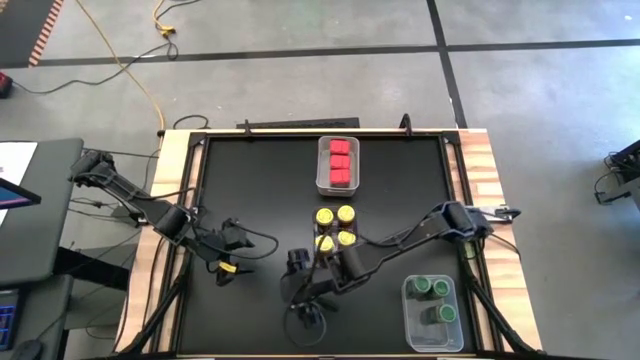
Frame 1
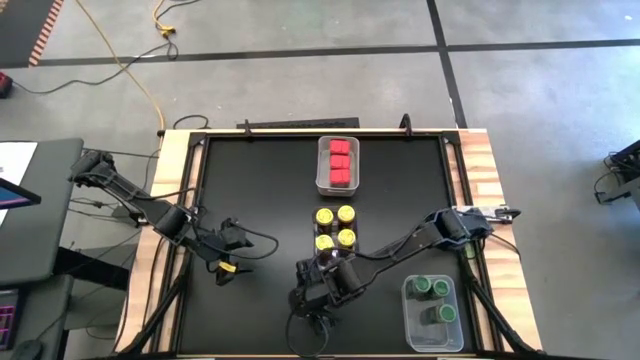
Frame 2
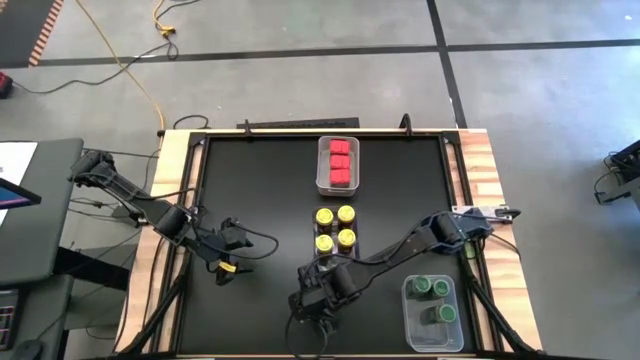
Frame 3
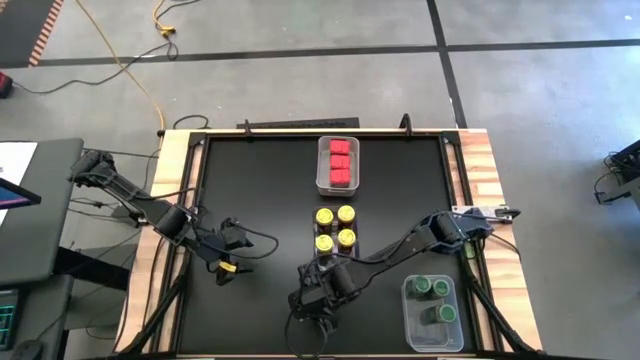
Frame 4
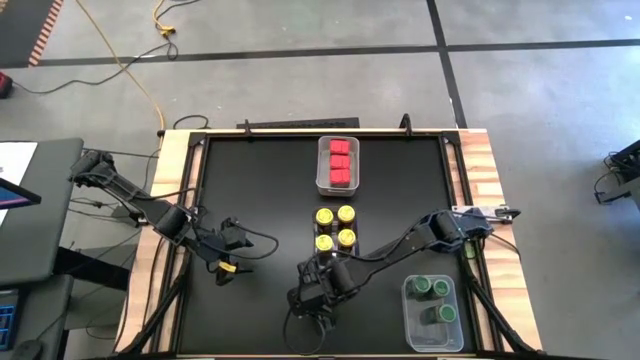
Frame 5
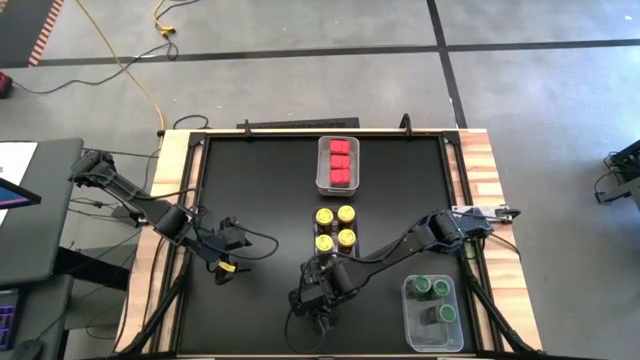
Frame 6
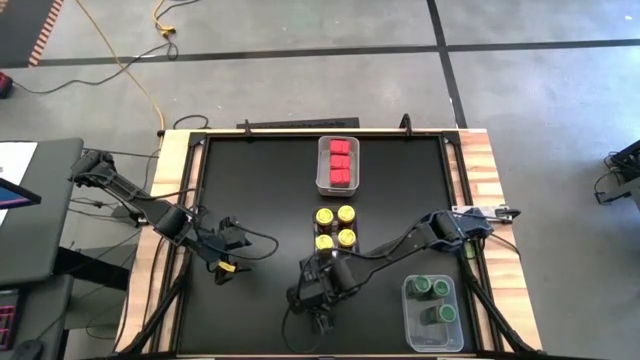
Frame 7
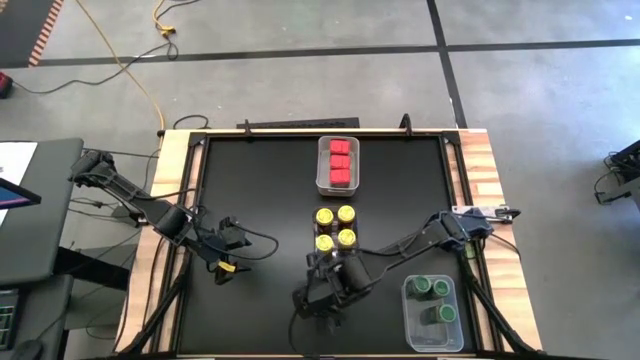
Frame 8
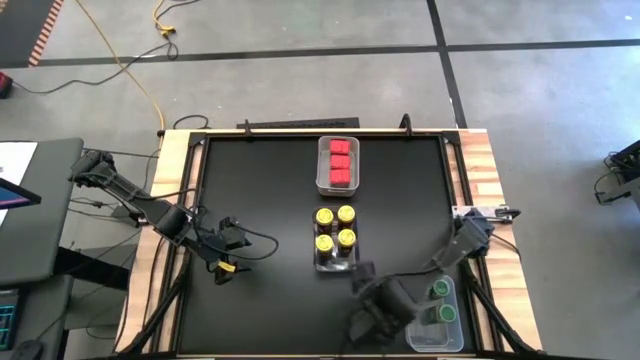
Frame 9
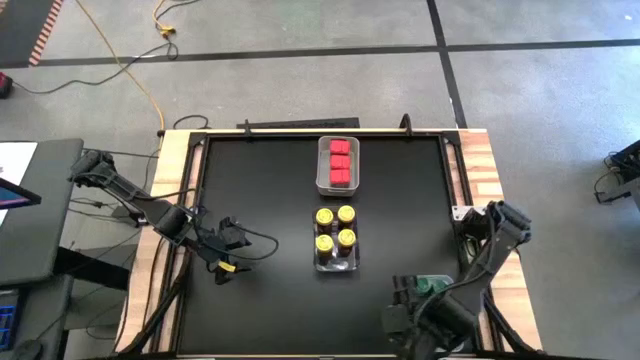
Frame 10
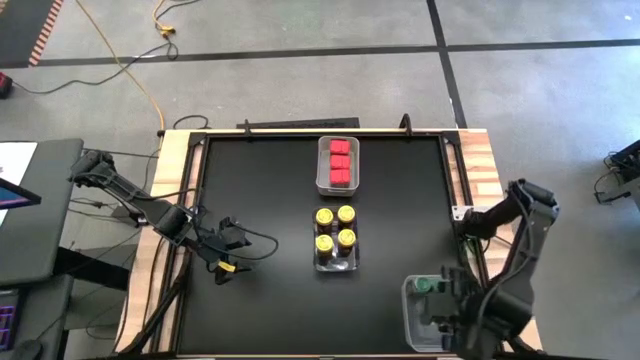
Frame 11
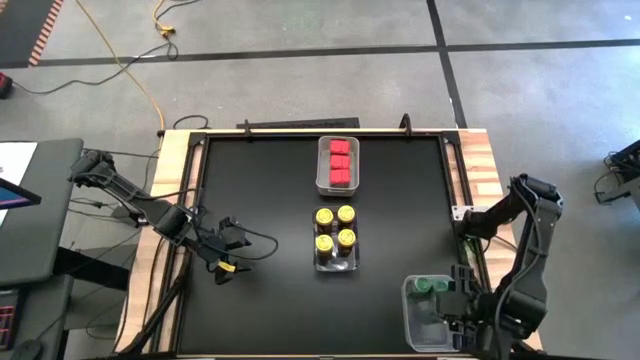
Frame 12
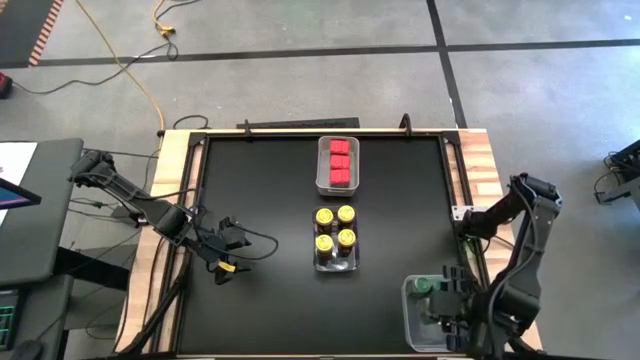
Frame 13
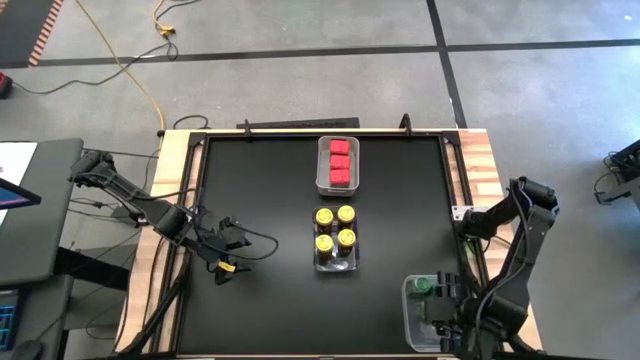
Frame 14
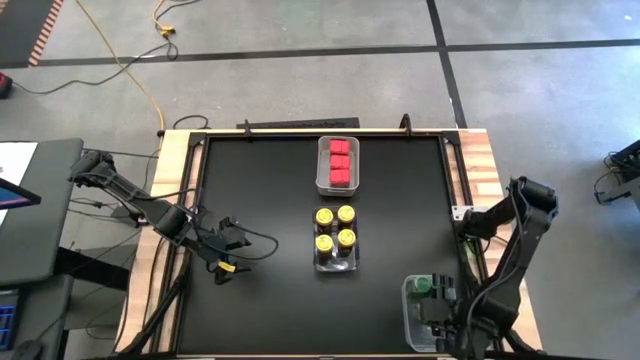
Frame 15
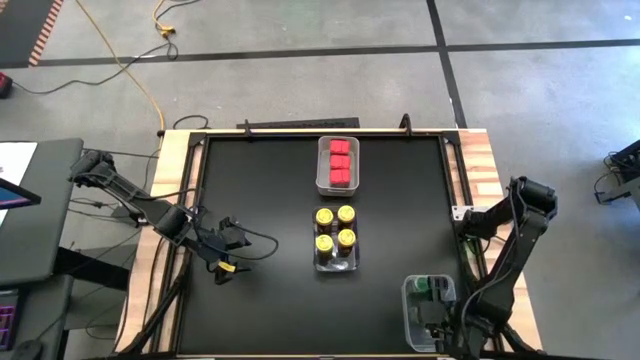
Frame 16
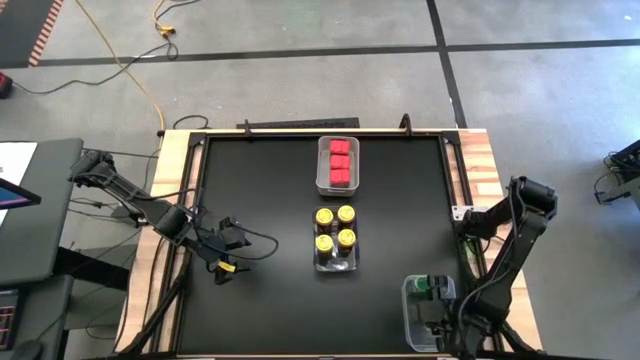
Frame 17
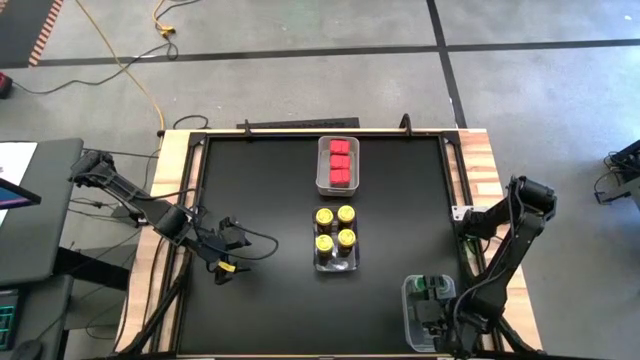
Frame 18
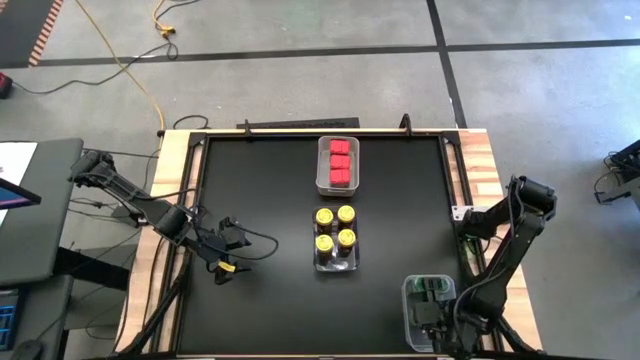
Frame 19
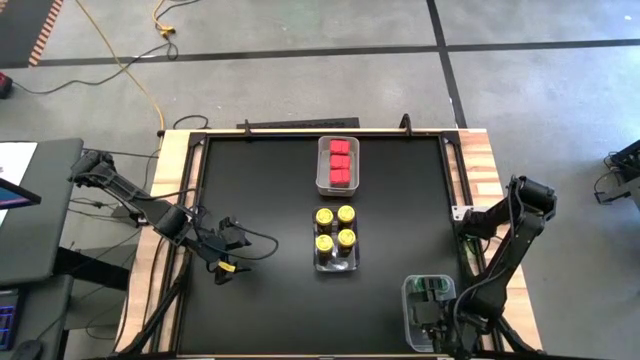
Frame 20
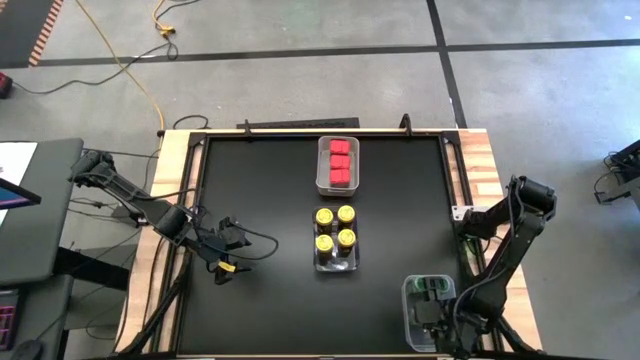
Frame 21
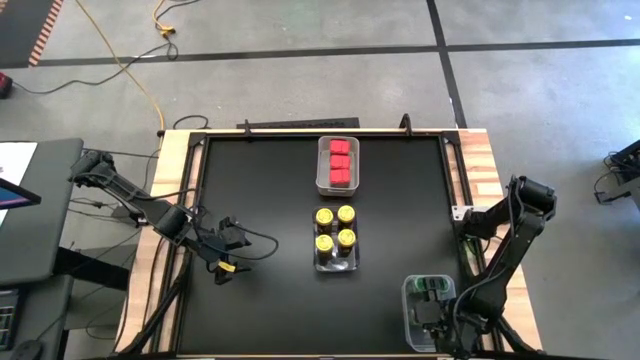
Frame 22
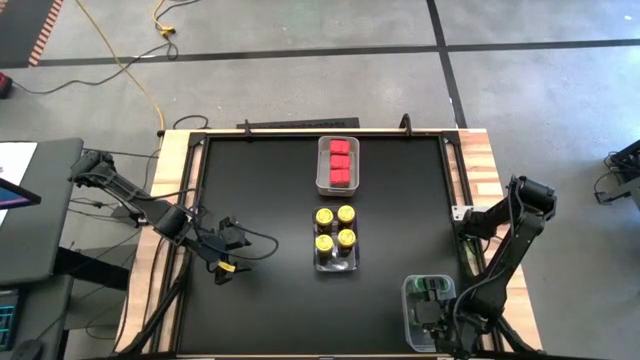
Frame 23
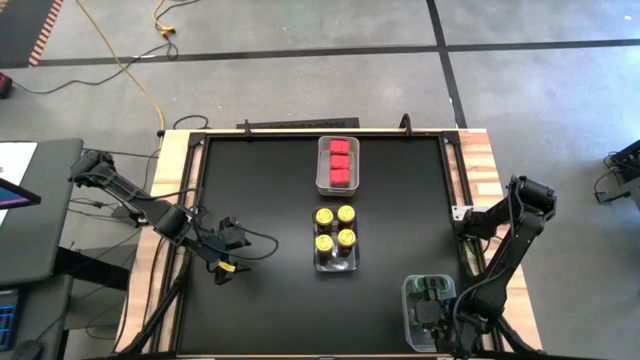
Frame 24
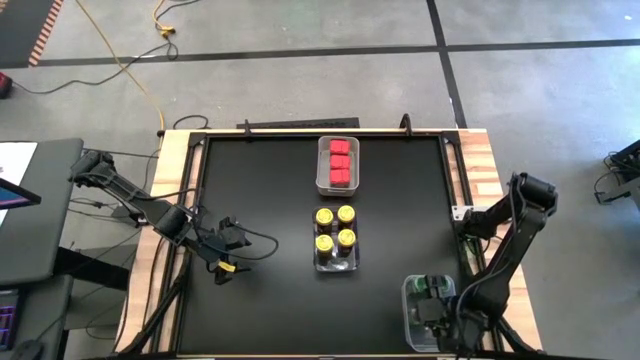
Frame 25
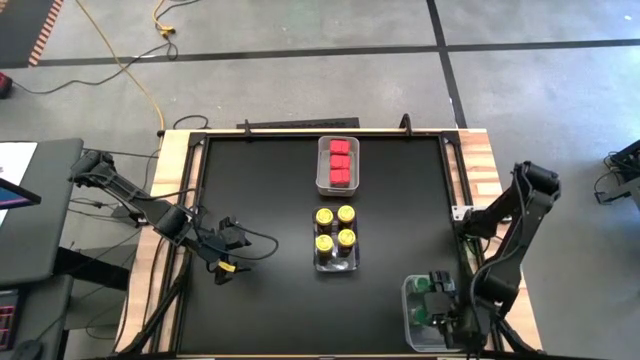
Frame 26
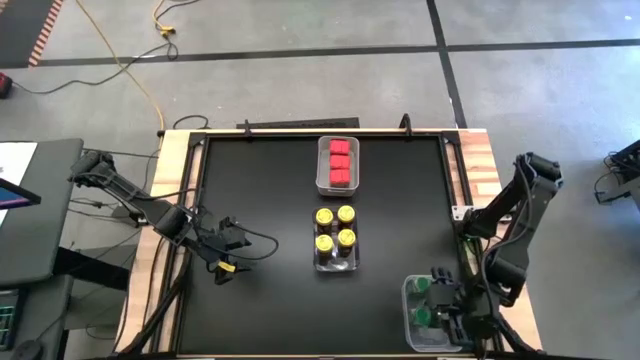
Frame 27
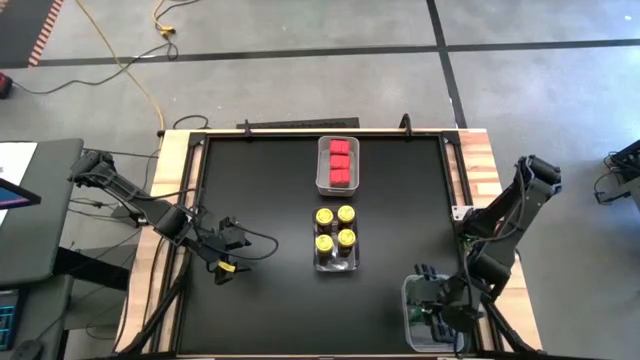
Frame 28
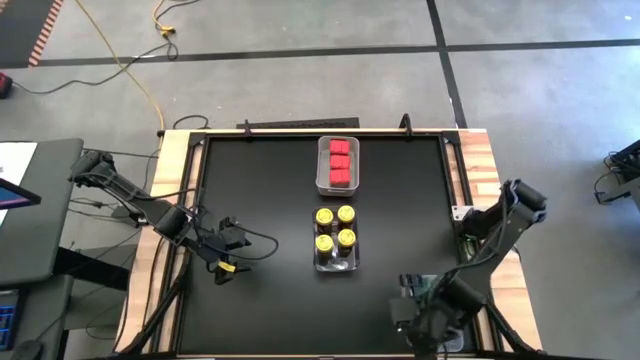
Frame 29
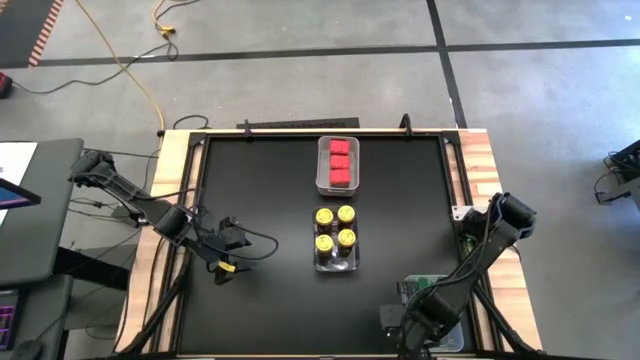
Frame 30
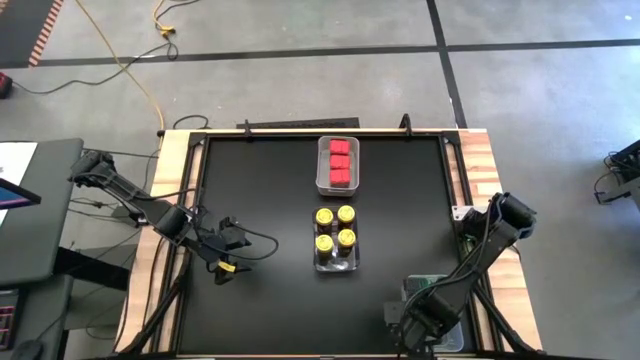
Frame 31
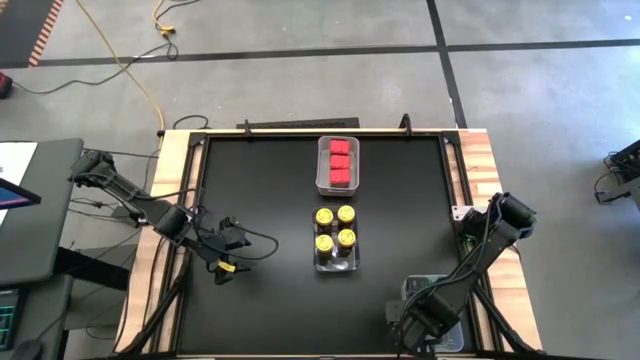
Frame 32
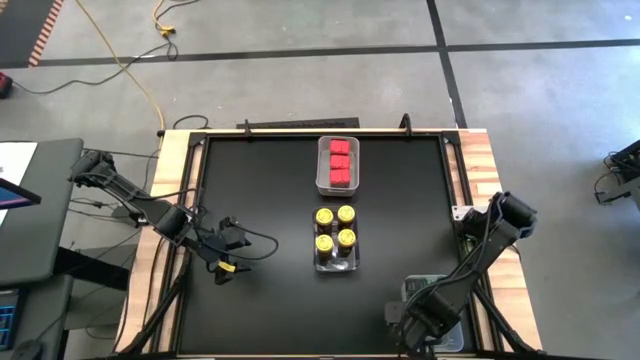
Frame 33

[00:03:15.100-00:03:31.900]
Task: Sort spices by type
Put the green seasoning bottle into the transparent bin
